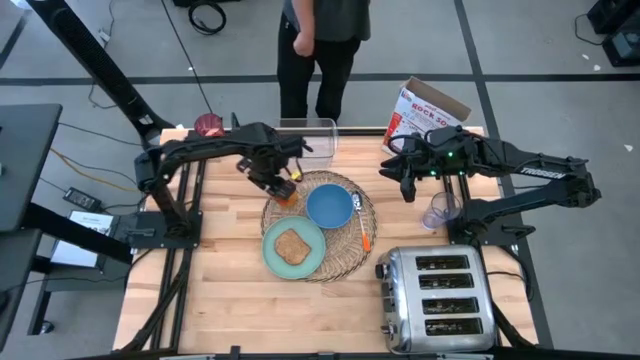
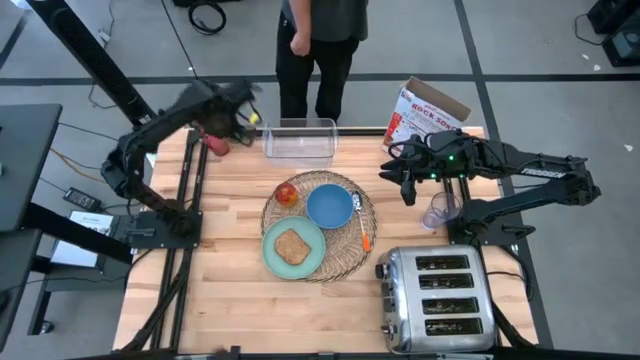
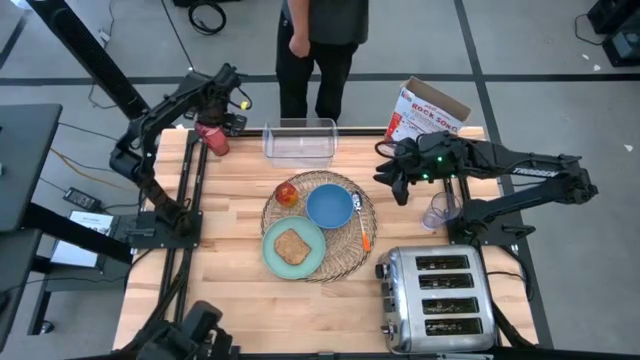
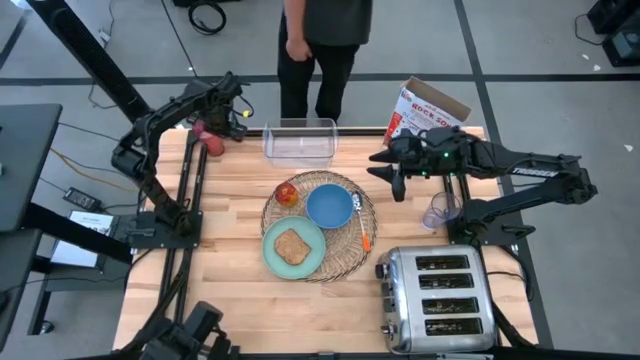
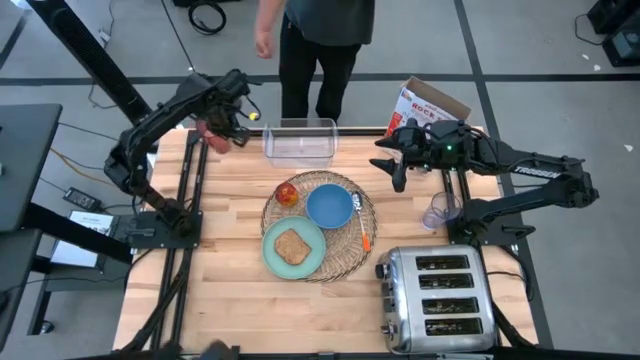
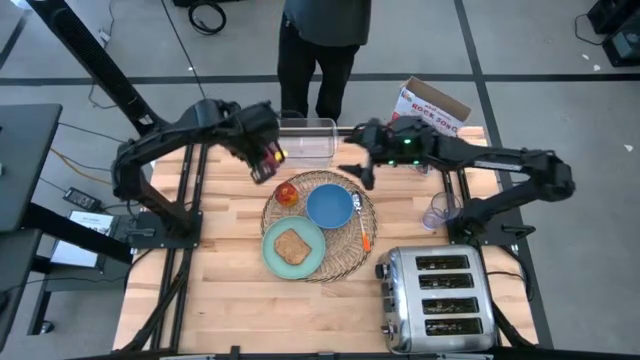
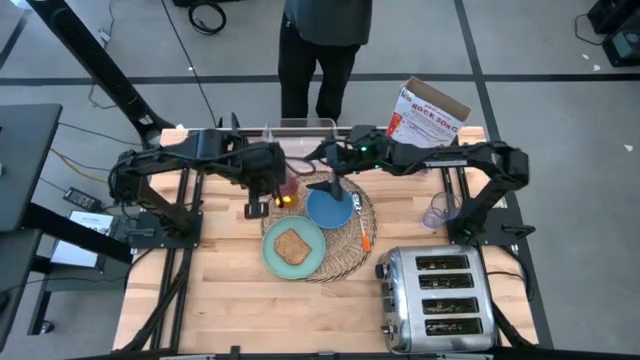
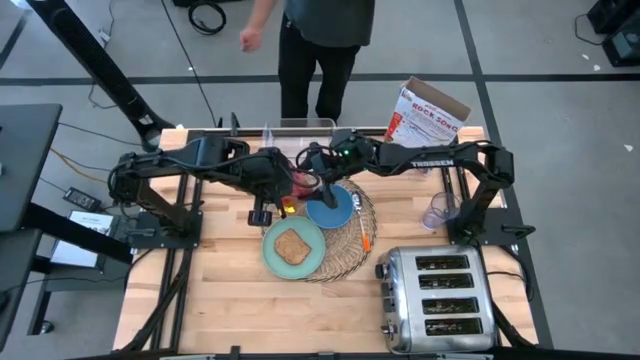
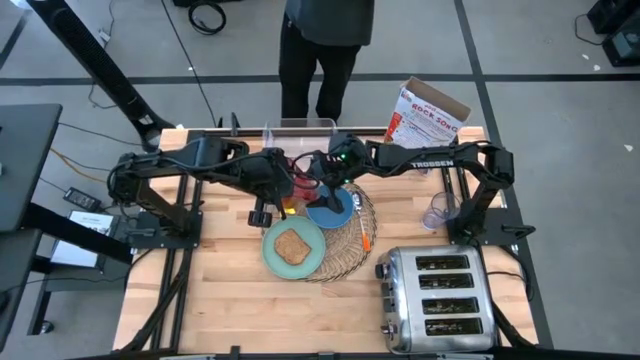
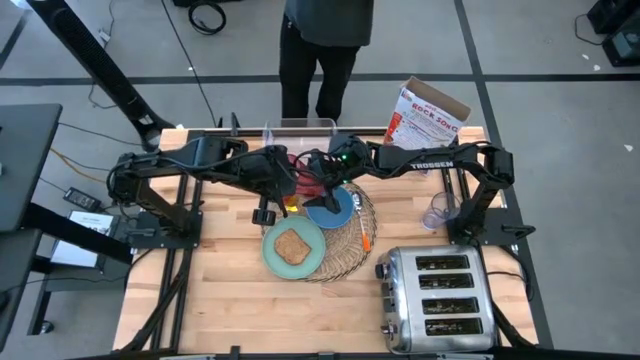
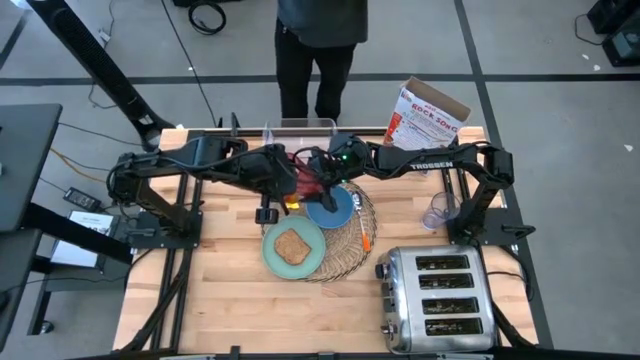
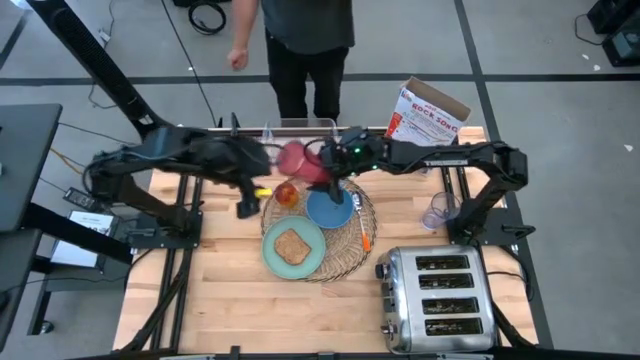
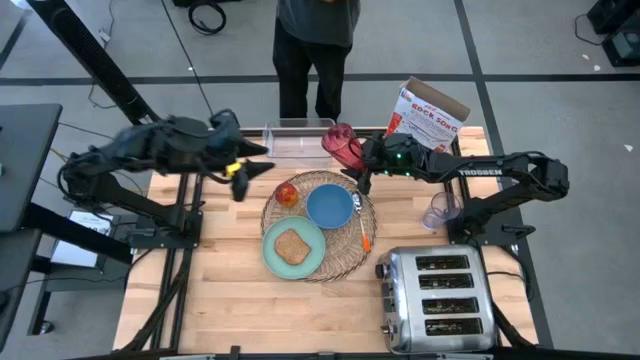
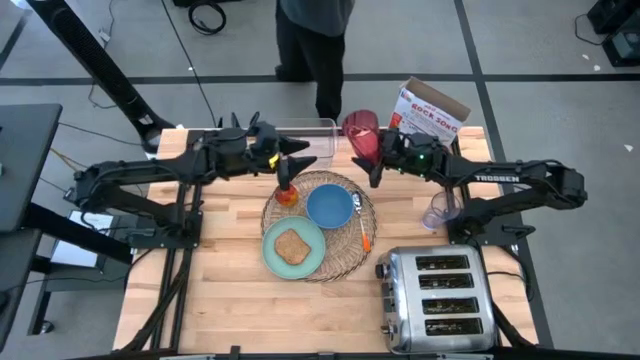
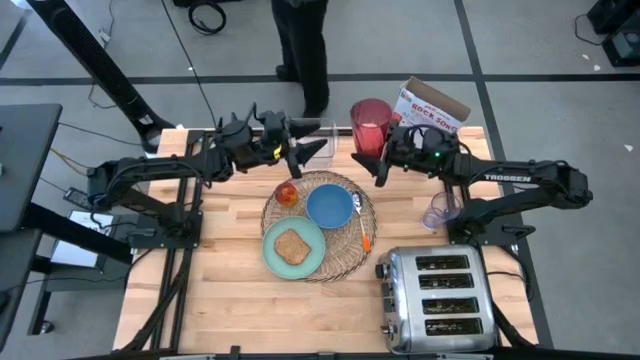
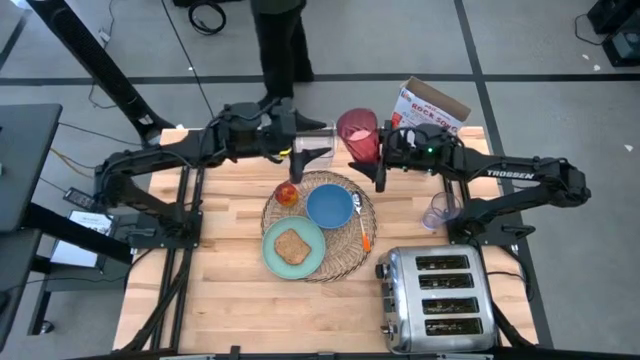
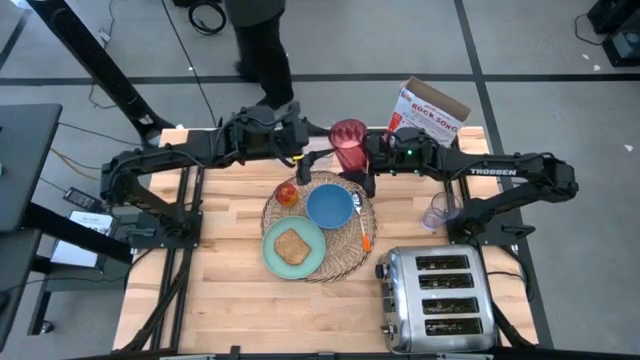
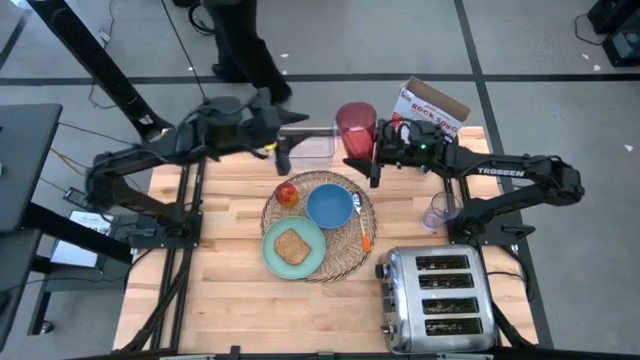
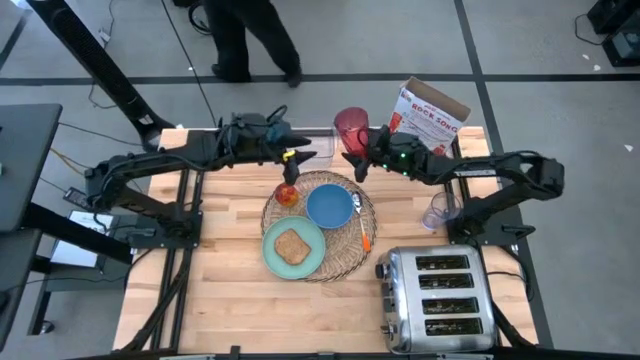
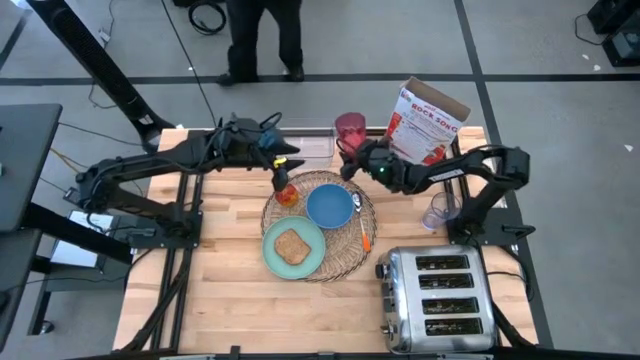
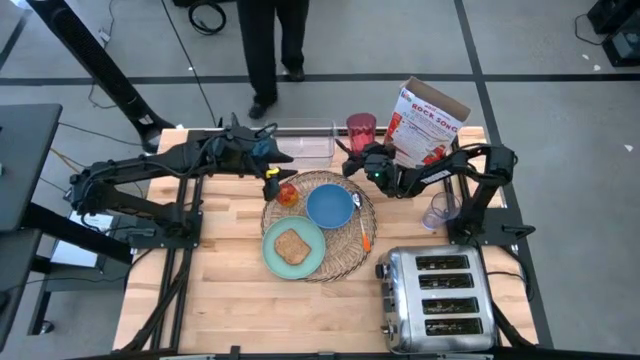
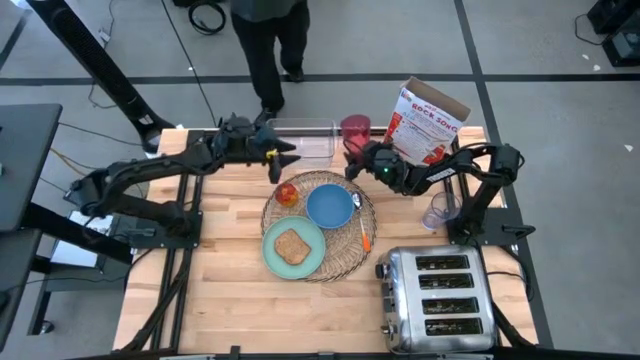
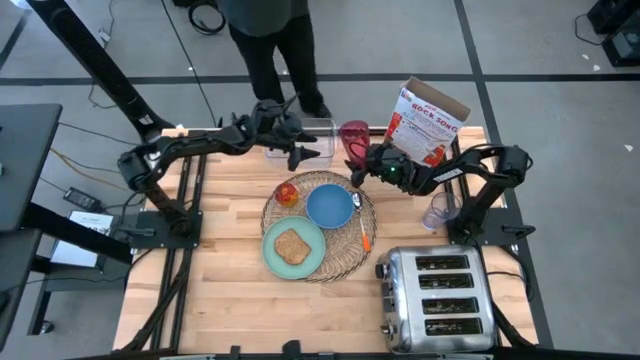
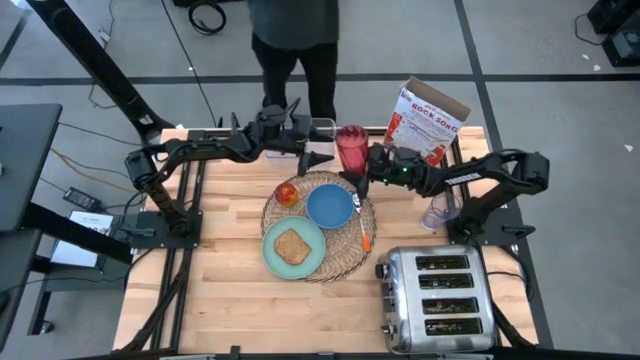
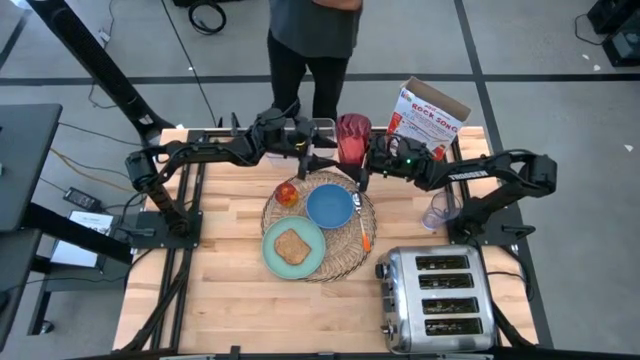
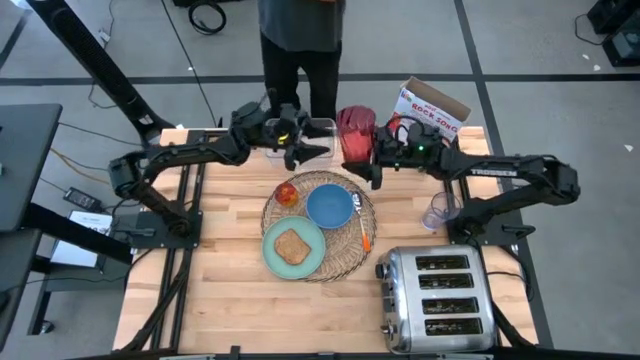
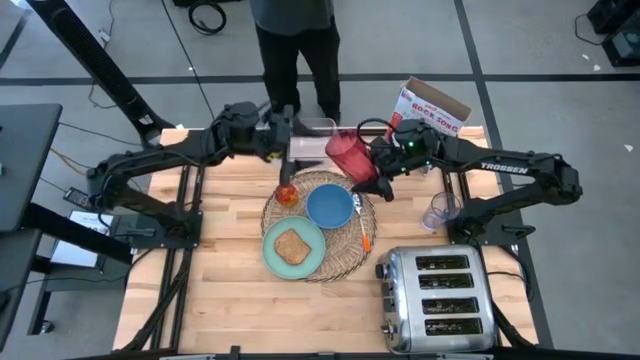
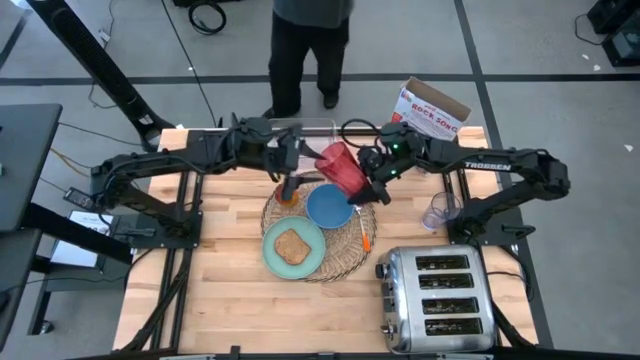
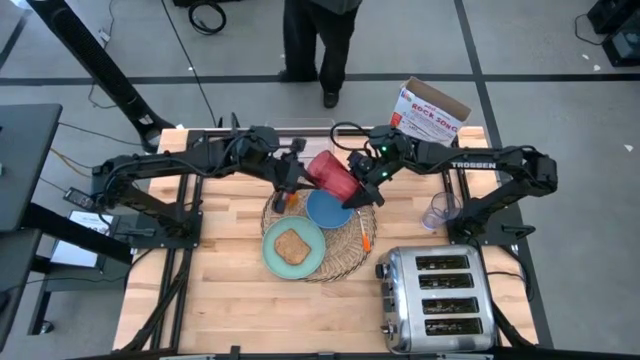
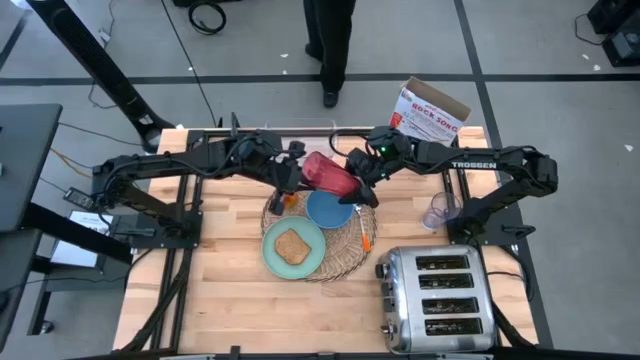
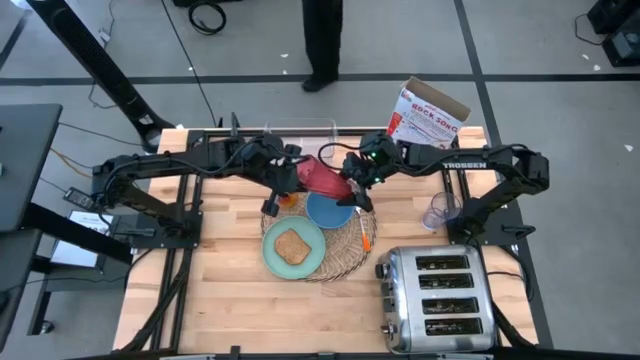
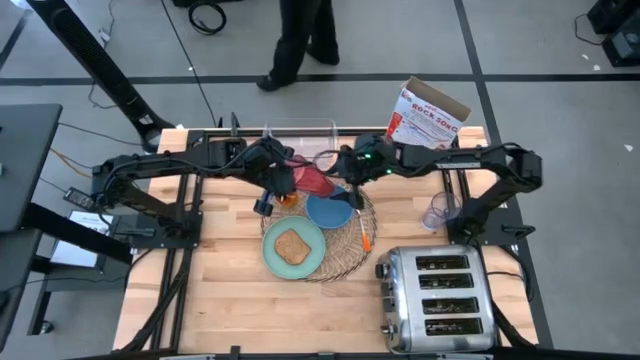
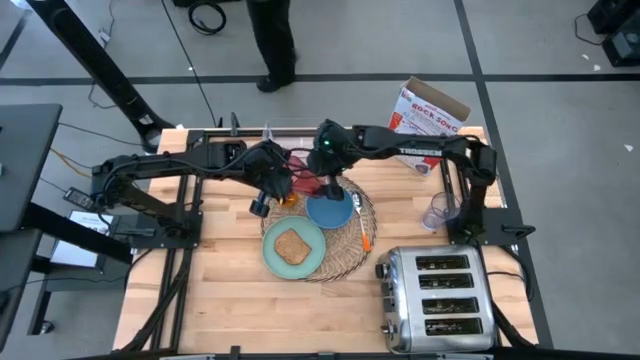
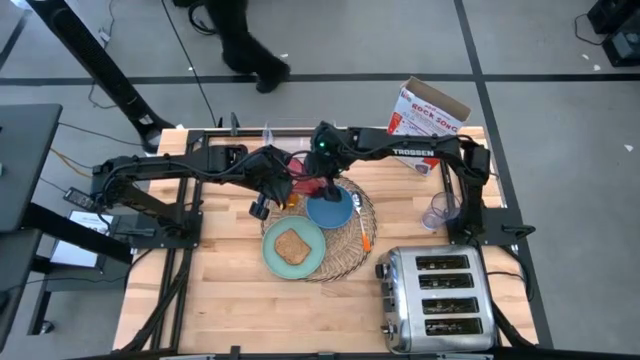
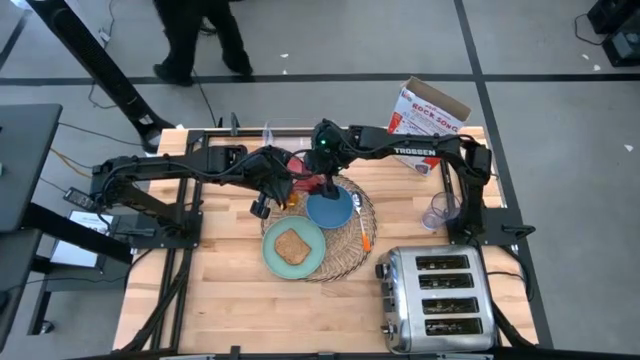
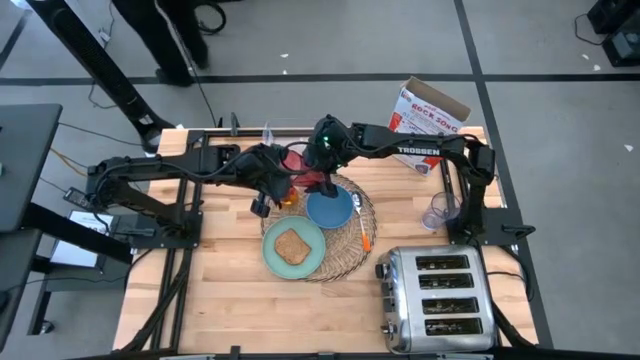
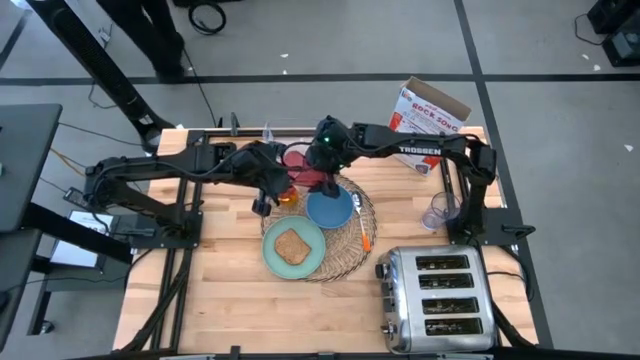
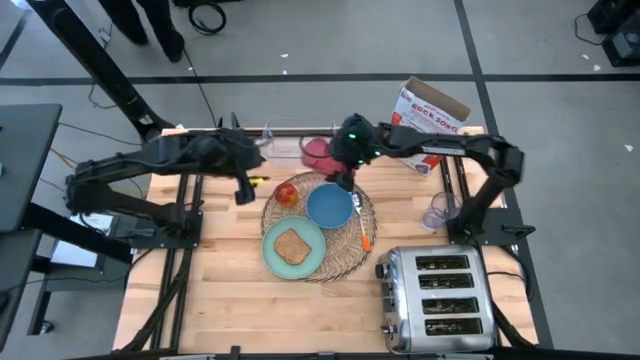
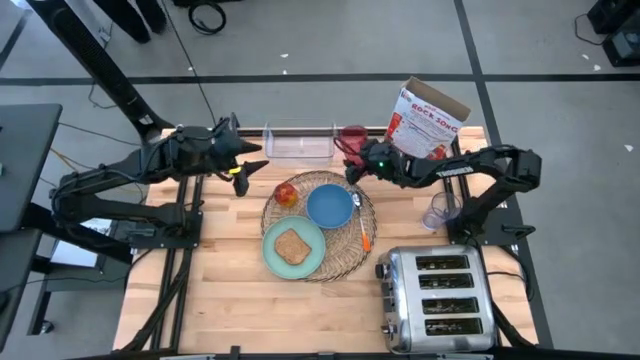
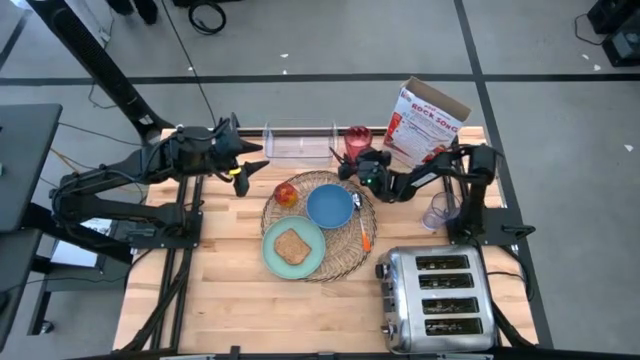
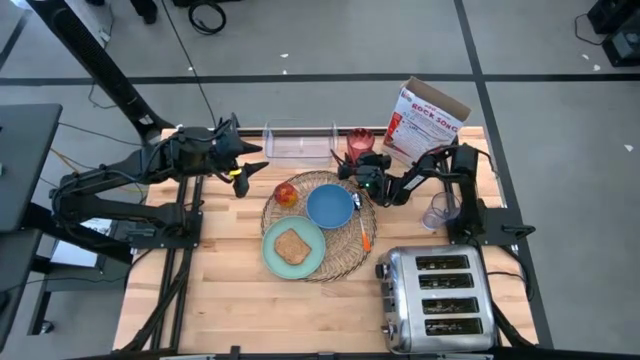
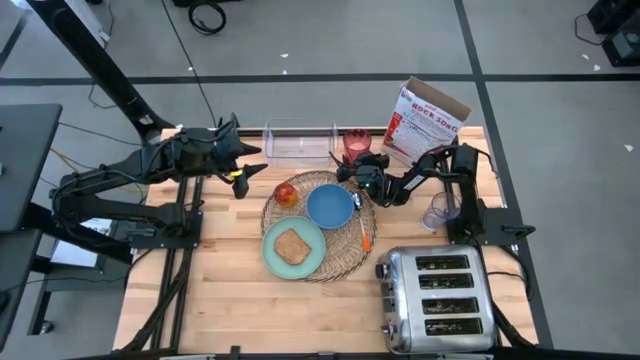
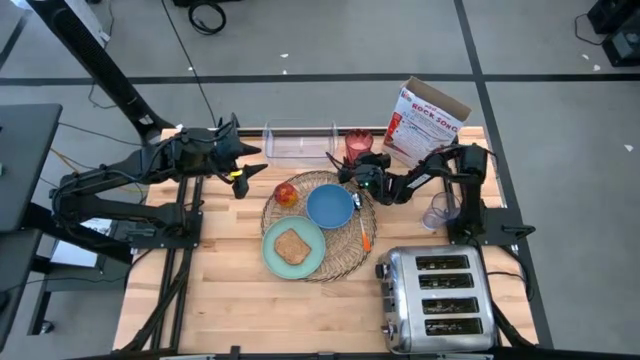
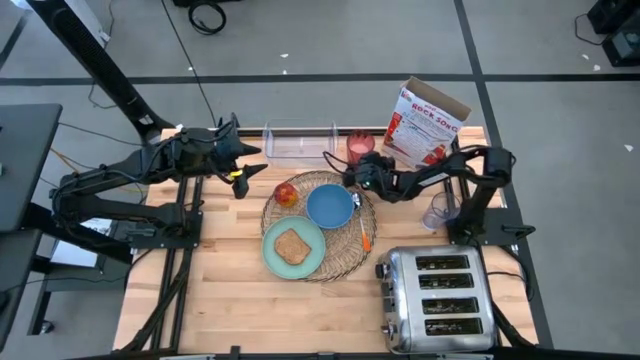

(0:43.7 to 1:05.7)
Task: Arrange a breakfast setting
Move the red cup to the top right of the table mat
